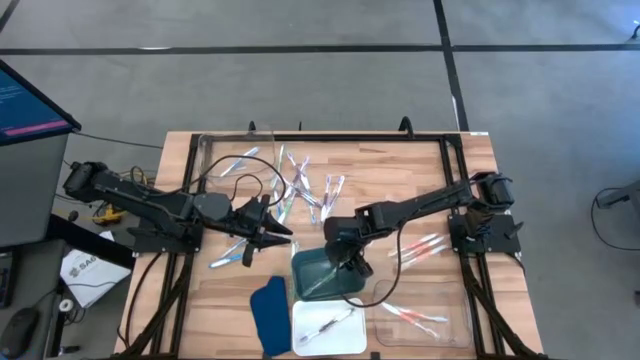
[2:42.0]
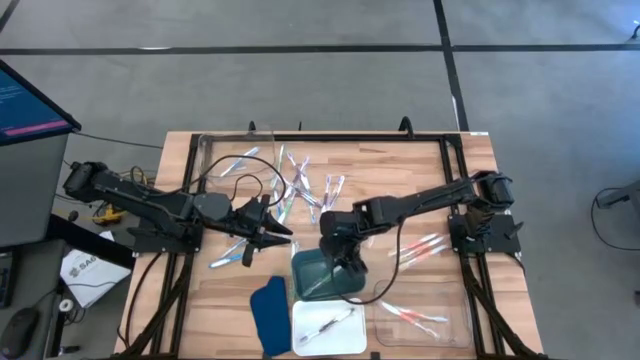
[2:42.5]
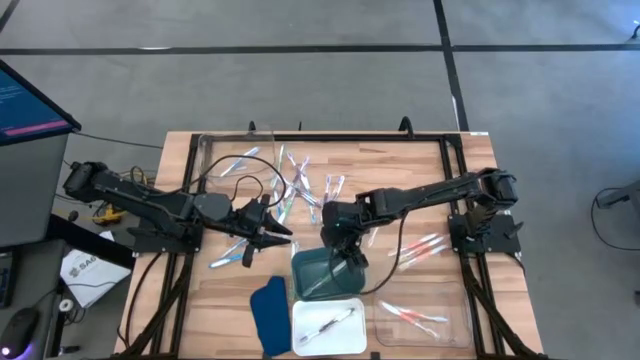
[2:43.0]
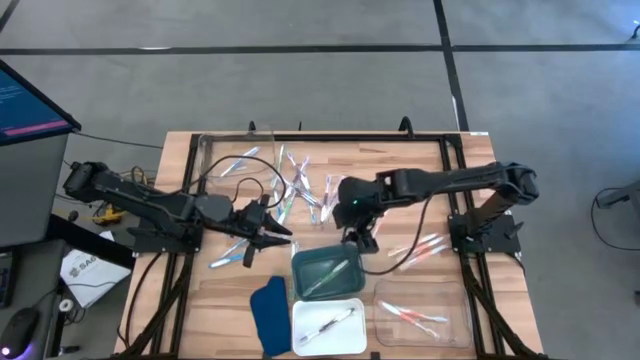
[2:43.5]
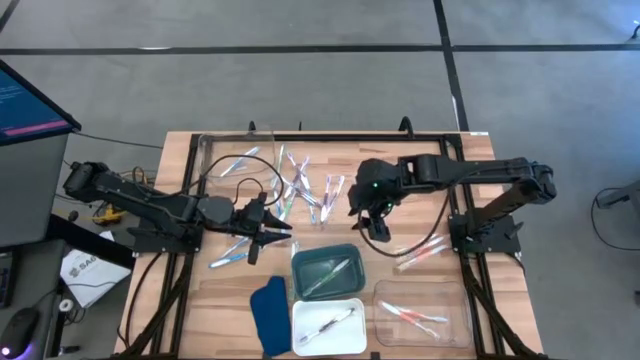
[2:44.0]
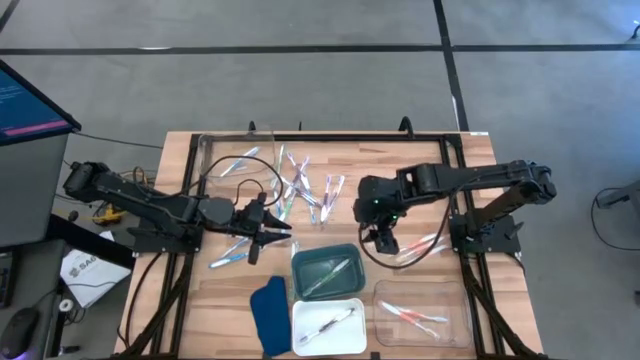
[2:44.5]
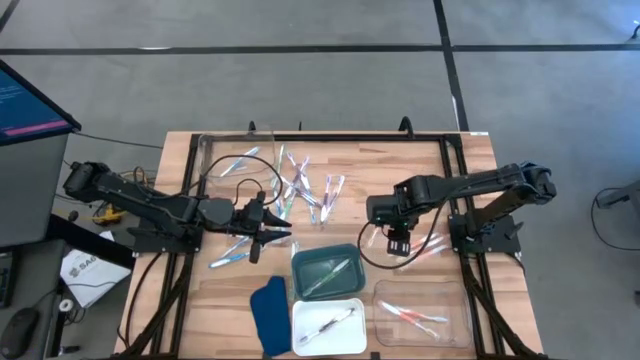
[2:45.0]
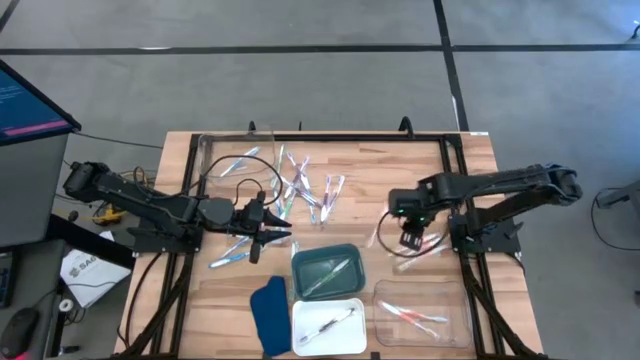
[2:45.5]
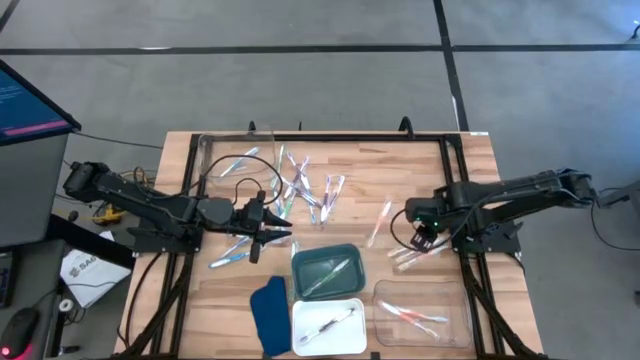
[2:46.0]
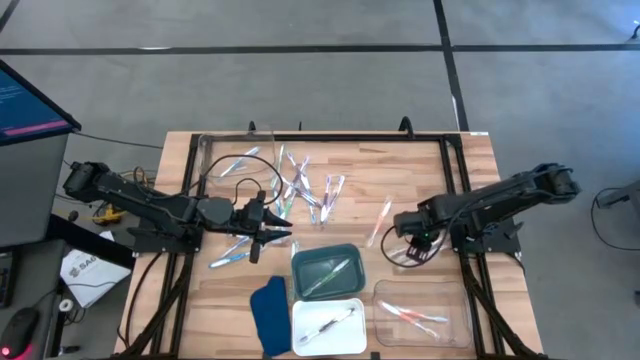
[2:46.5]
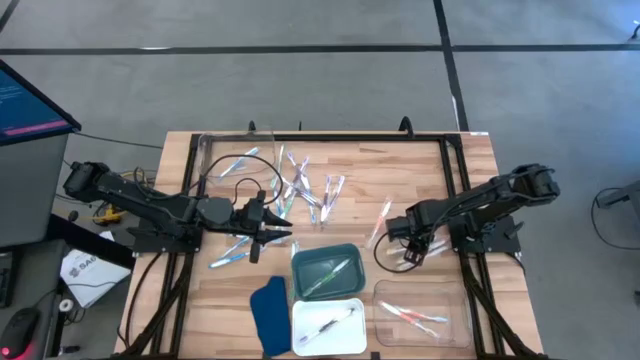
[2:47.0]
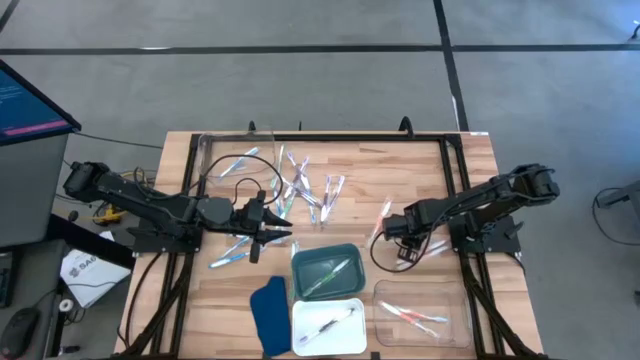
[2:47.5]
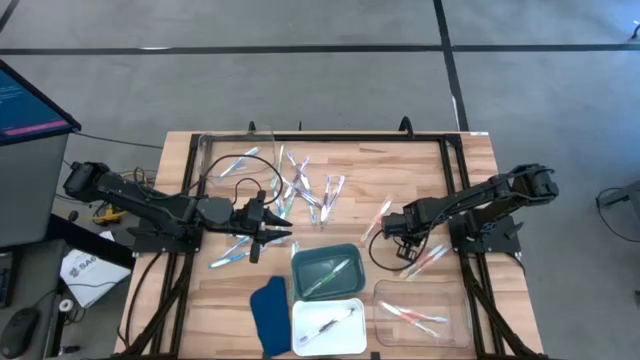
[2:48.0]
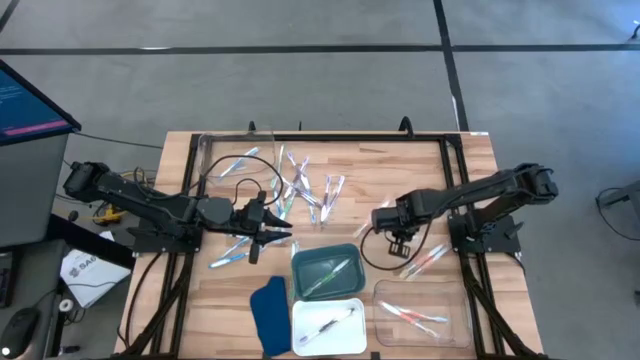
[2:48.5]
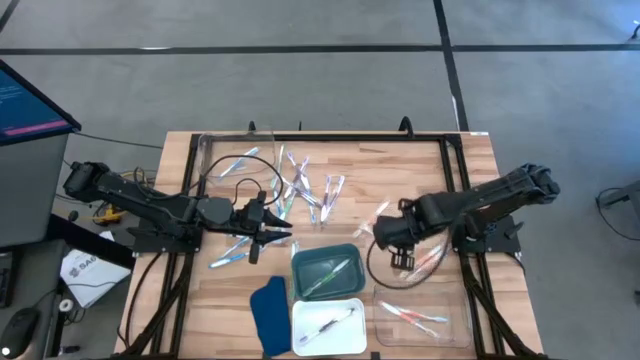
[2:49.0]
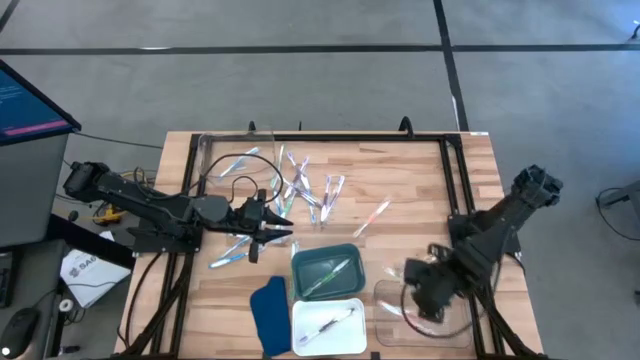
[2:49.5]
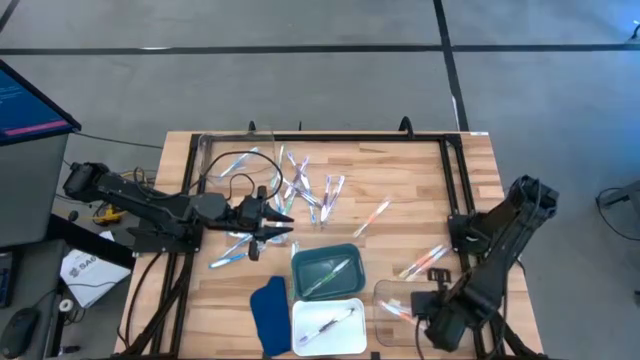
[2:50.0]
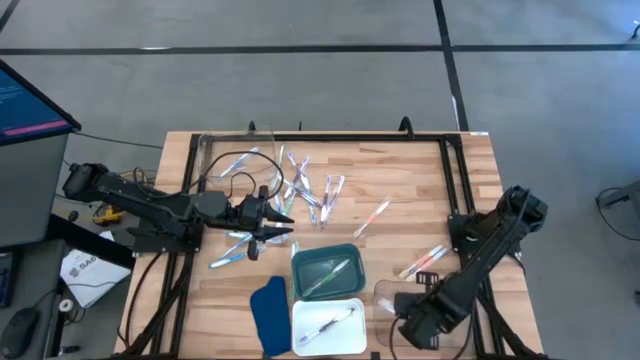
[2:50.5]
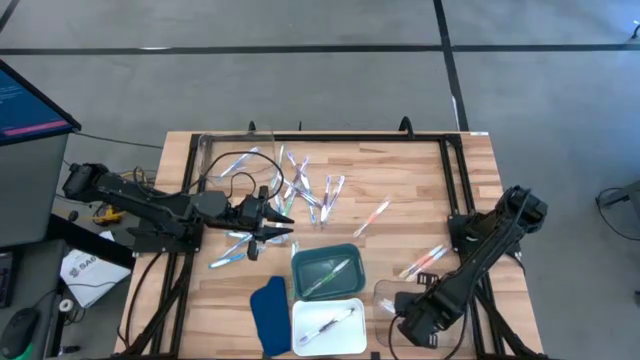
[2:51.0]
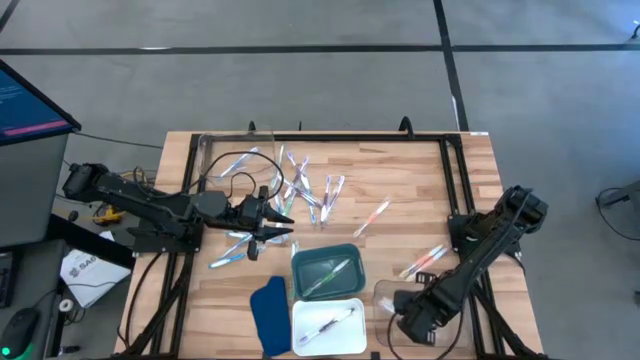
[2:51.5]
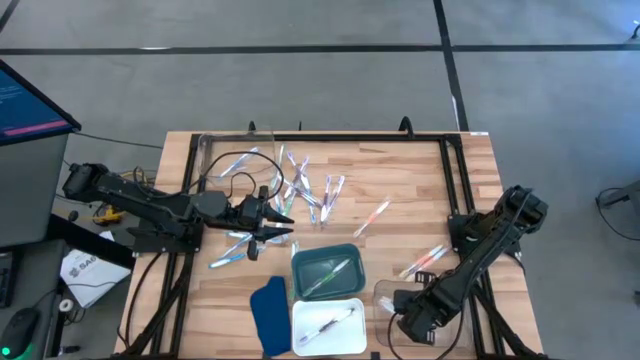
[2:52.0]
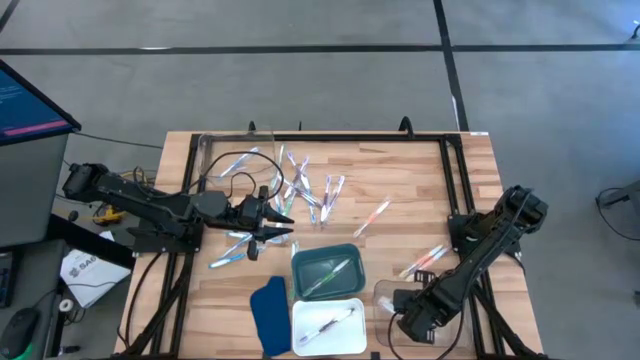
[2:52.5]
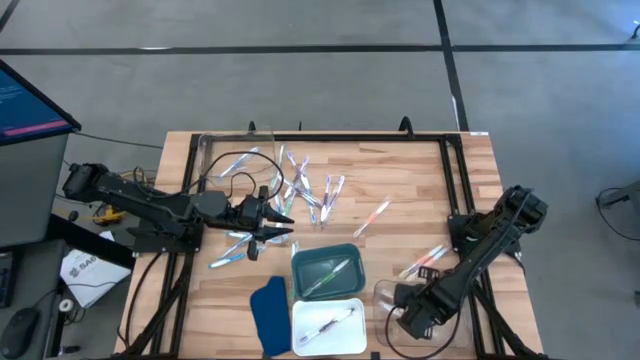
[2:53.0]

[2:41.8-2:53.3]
Task: Pick & Place Toothbrushes
Put the orange toothbrush into the bottom transparent bin

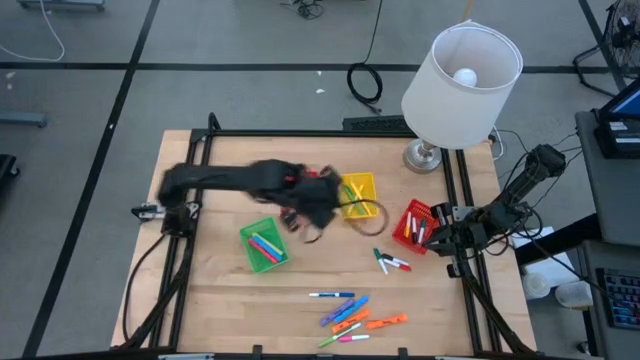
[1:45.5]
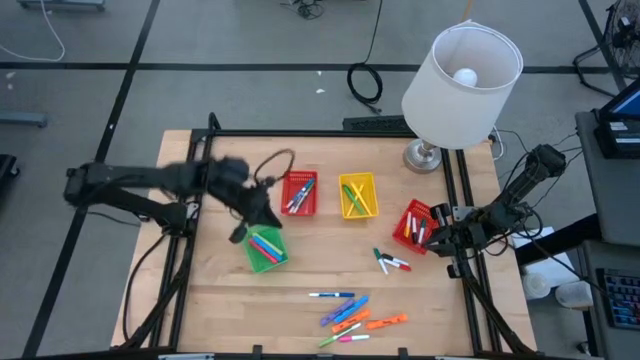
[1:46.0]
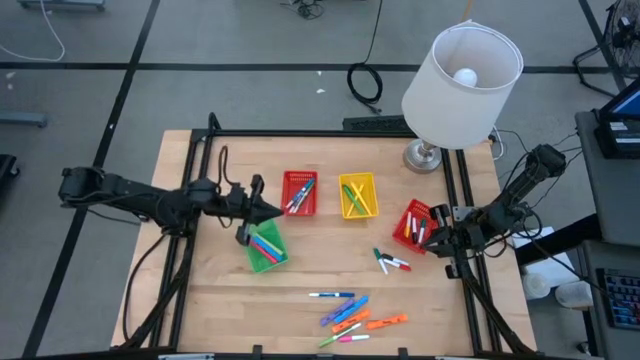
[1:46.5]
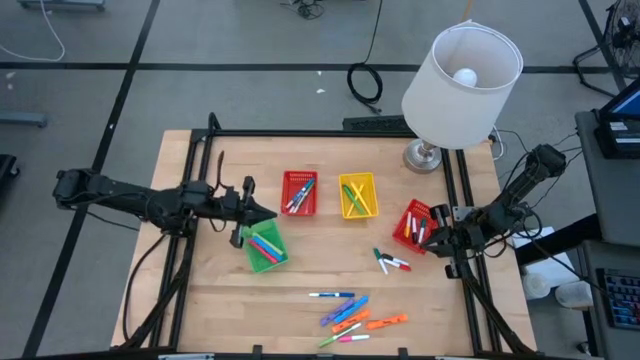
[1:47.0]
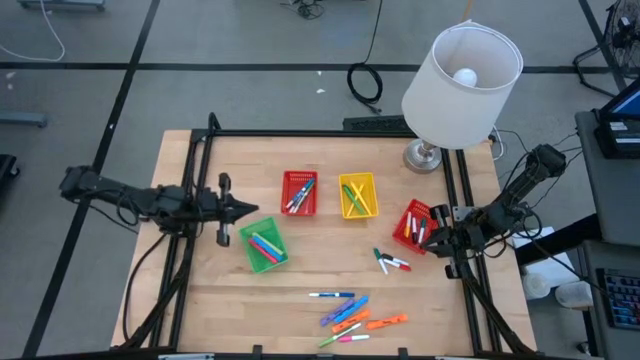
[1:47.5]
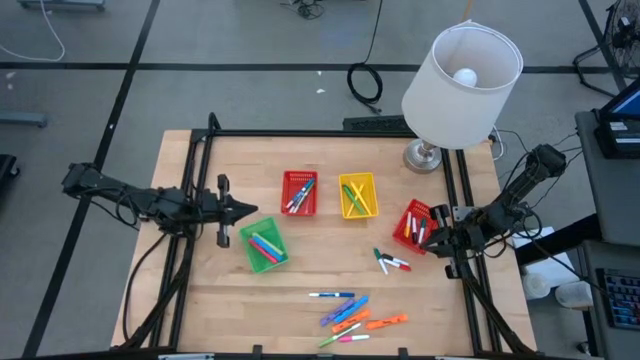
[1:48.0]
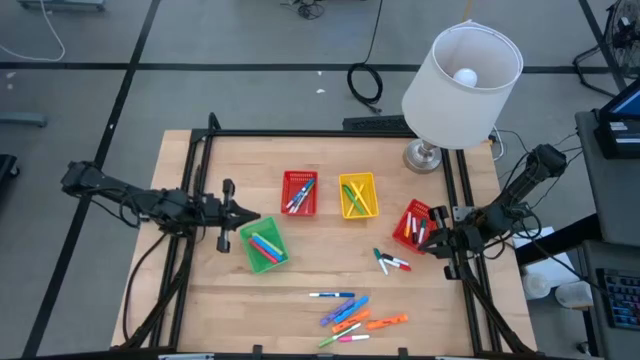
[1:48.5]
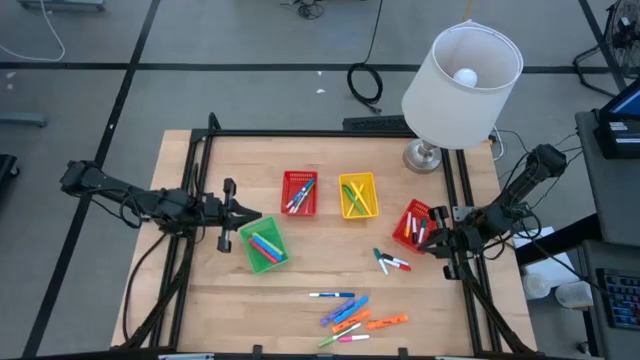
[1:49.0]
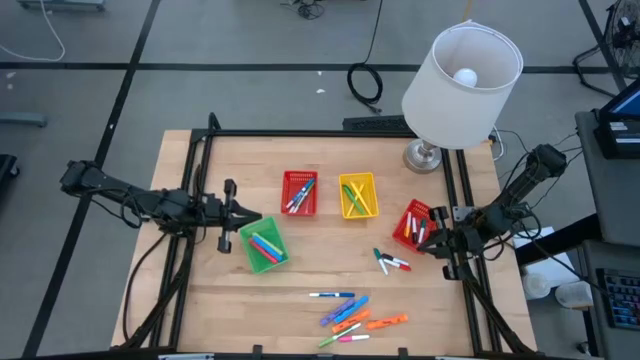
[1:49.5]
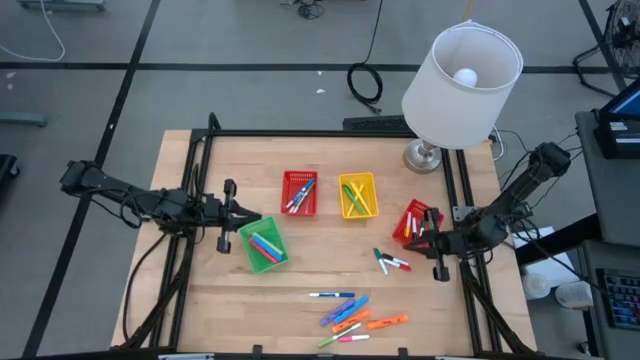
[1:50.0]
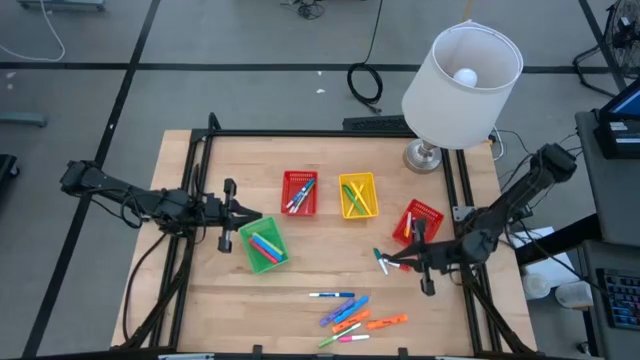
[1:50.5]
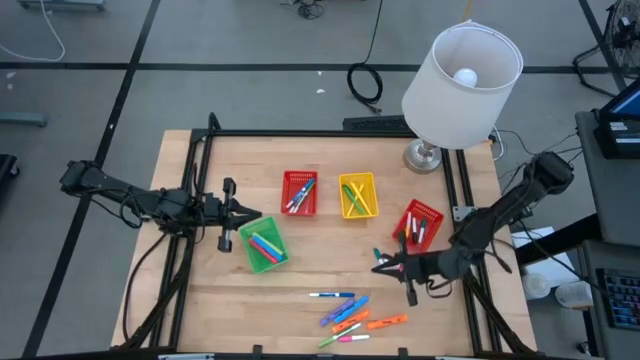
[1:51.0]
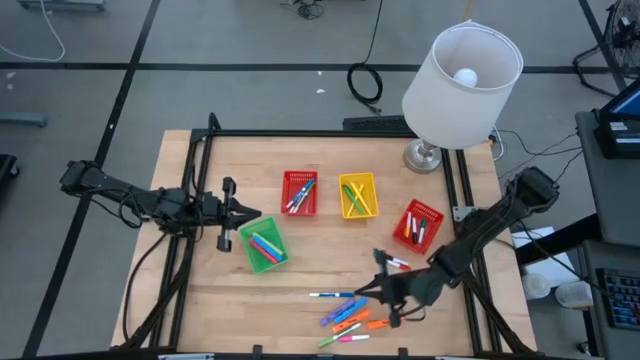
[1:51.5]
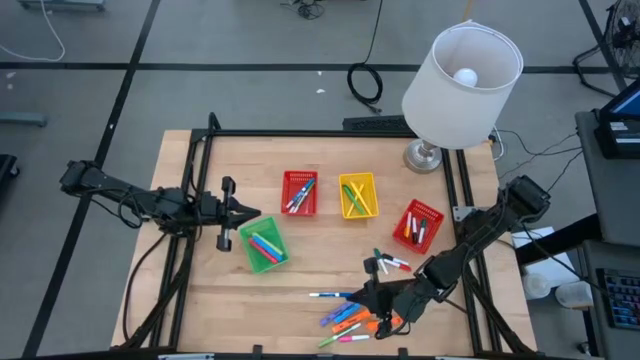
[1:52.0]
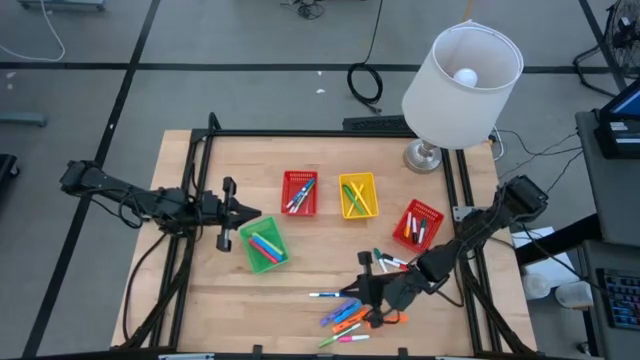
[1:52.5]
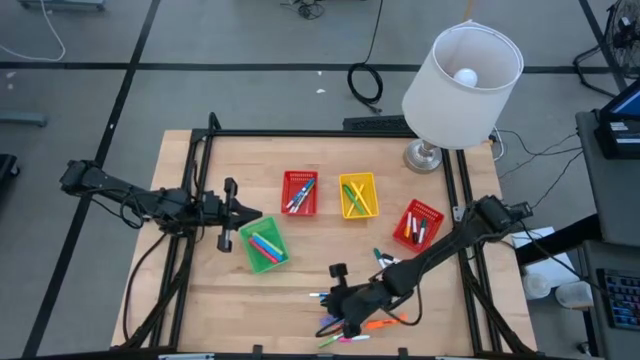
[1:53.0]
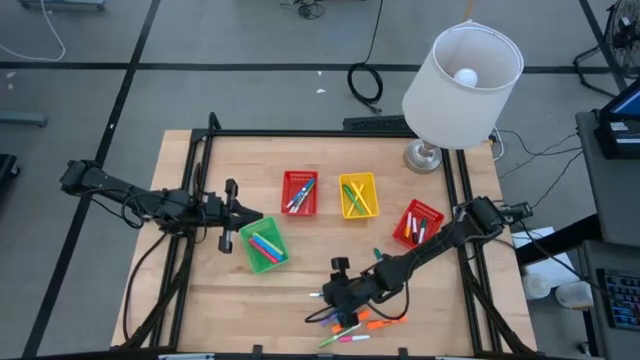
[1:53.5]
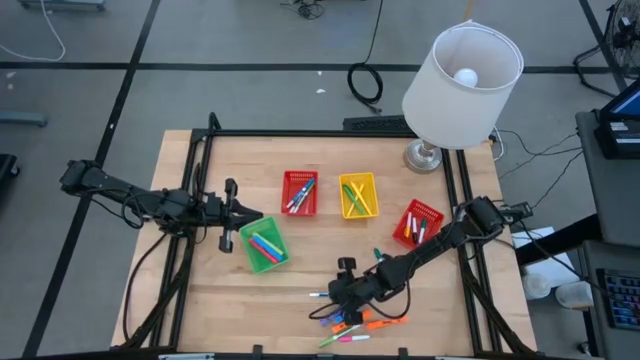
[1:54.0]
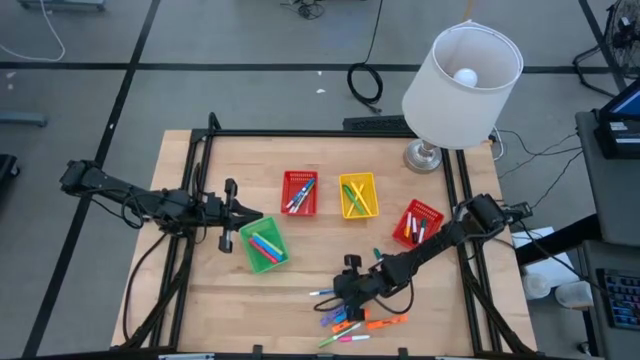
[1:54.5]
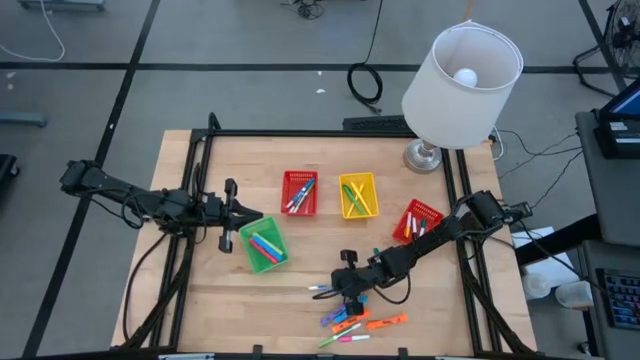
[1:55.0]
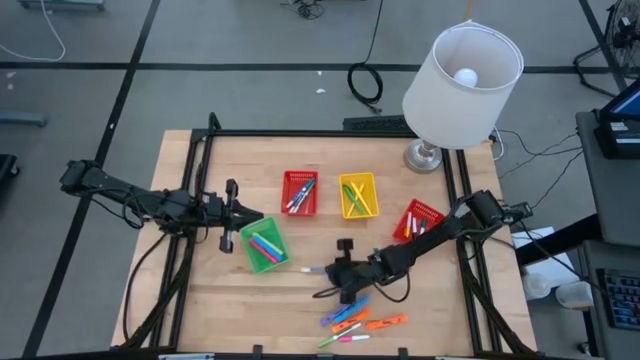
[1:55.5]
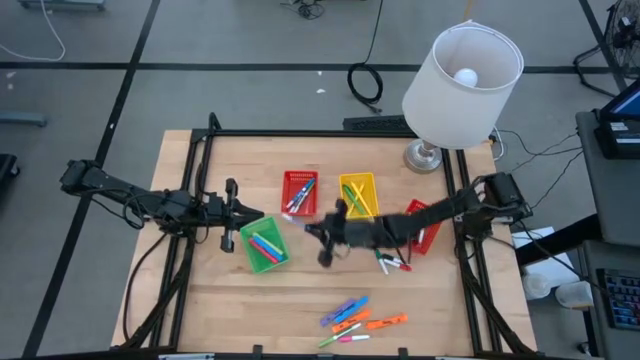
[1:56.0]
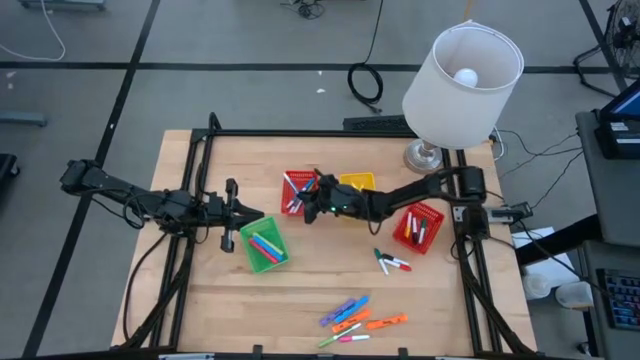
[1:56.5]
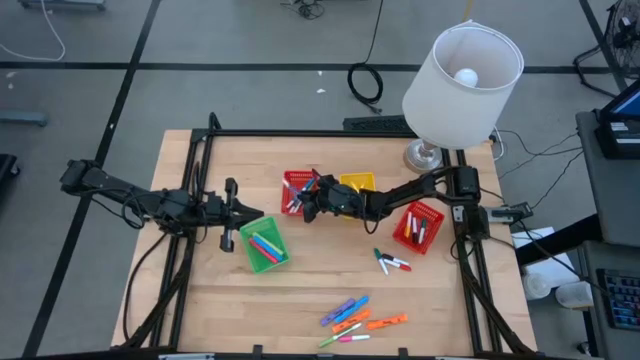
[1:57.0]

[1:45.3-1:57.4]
Task: Pick & Place Markers
Put the blue marker into the left red bin
